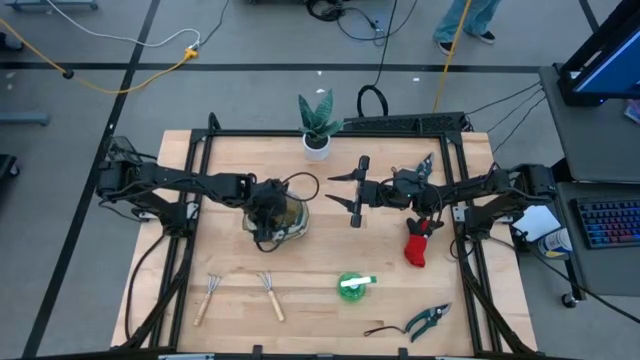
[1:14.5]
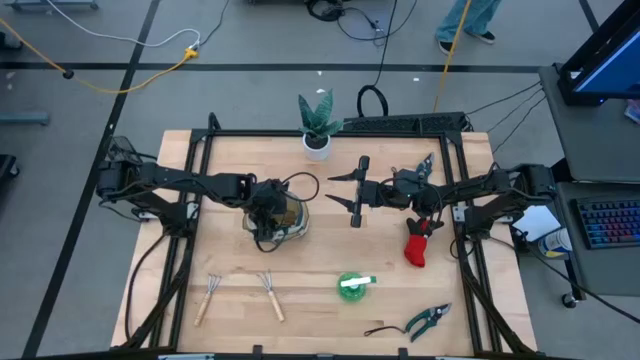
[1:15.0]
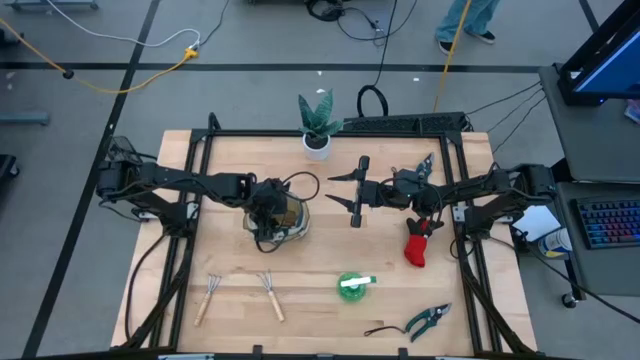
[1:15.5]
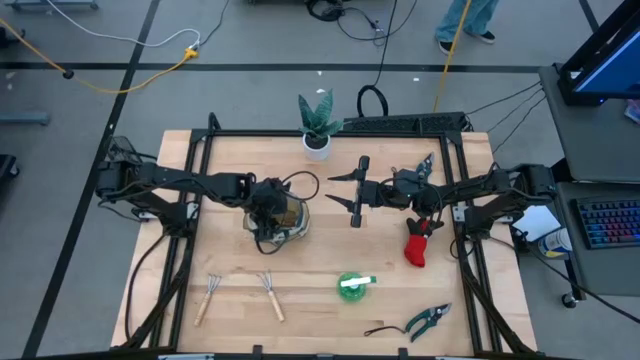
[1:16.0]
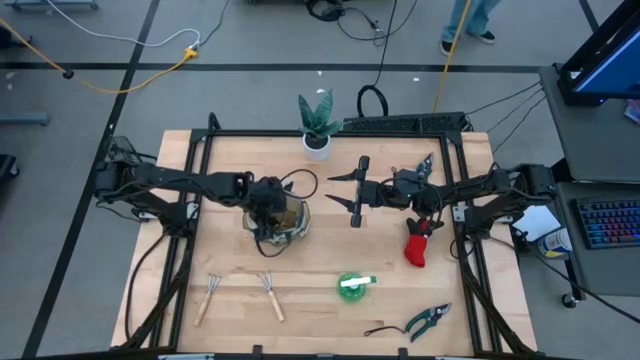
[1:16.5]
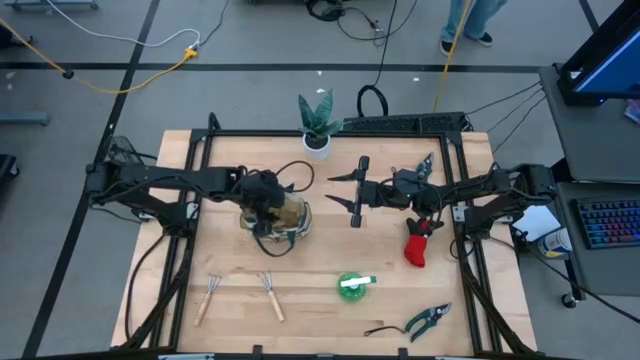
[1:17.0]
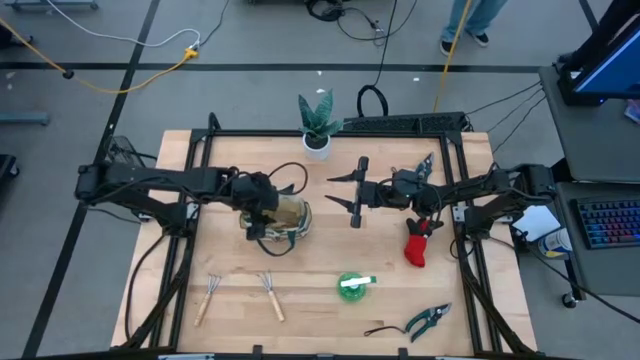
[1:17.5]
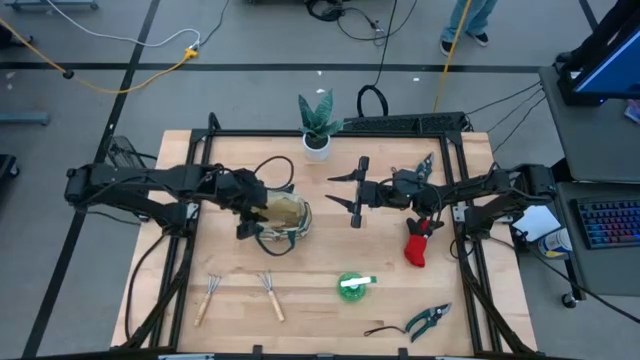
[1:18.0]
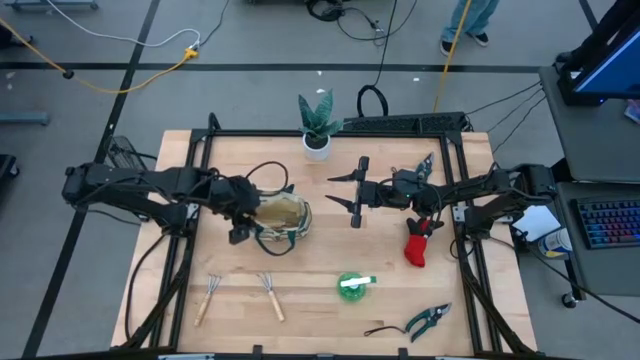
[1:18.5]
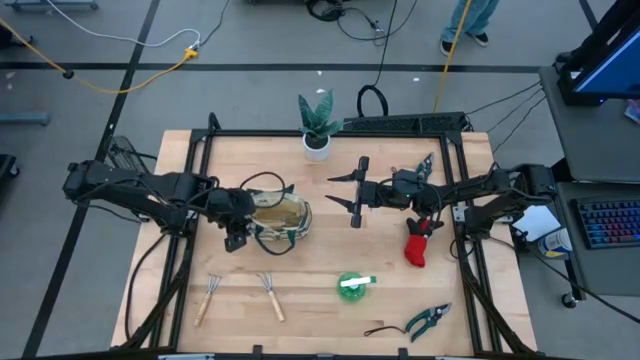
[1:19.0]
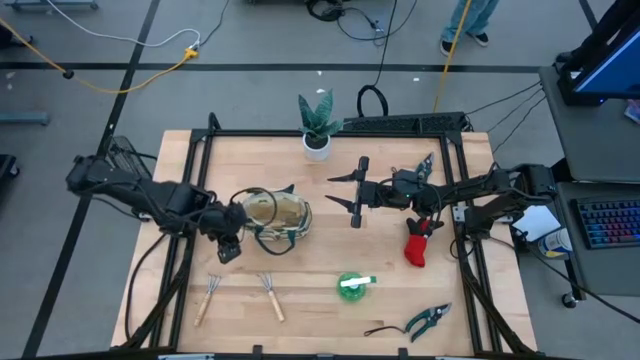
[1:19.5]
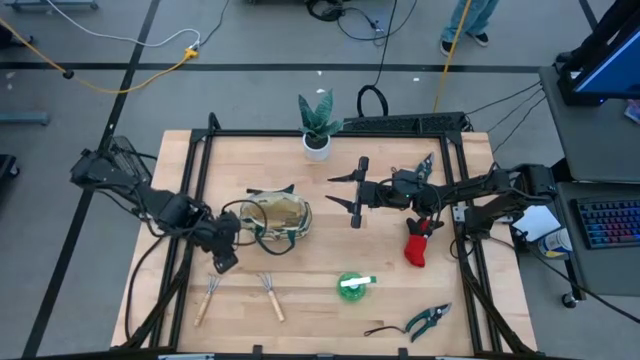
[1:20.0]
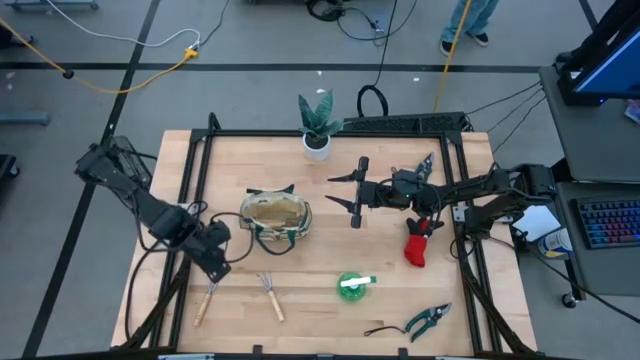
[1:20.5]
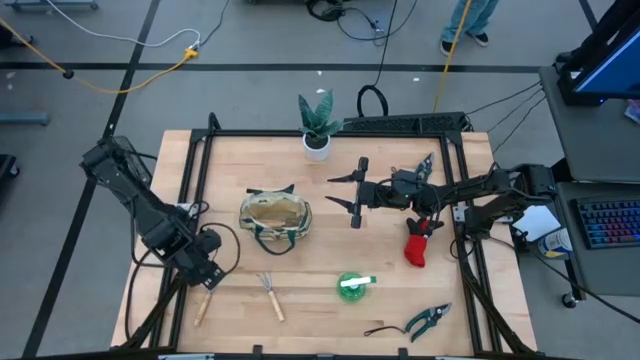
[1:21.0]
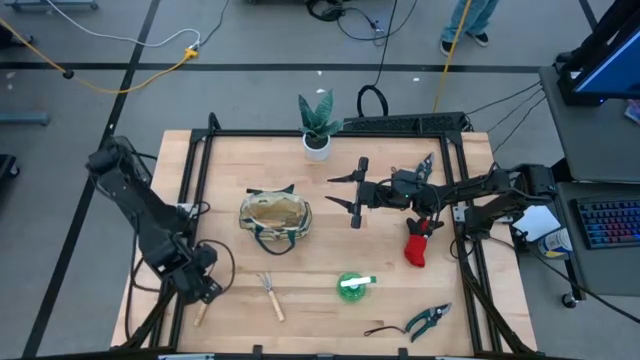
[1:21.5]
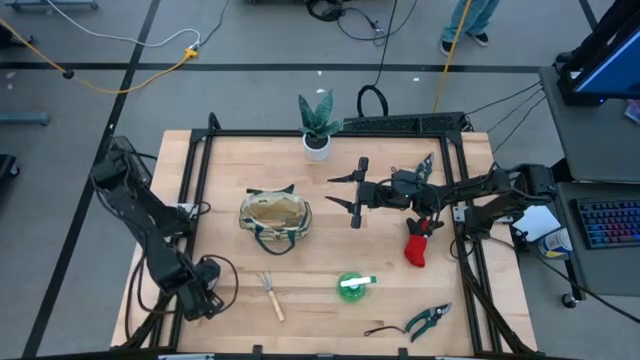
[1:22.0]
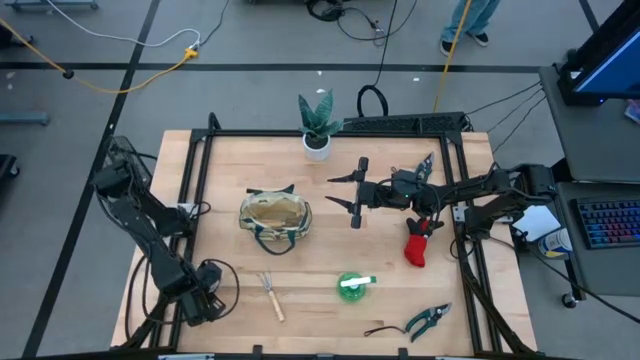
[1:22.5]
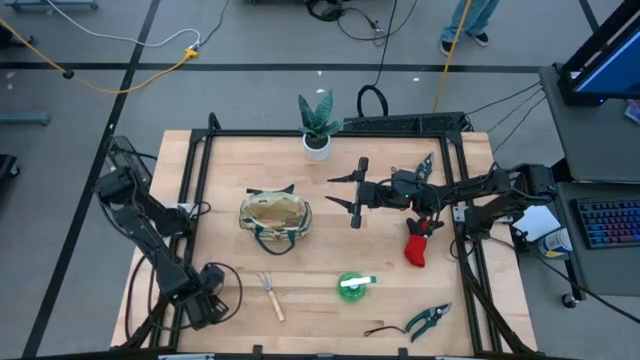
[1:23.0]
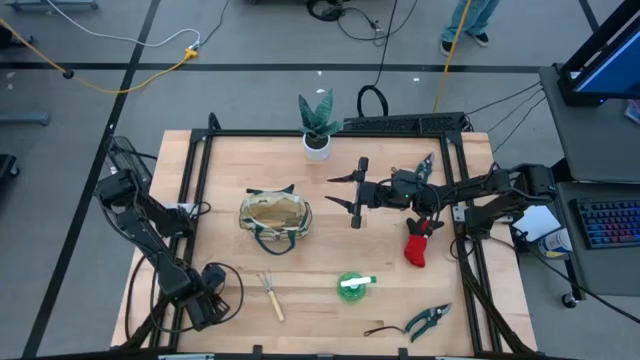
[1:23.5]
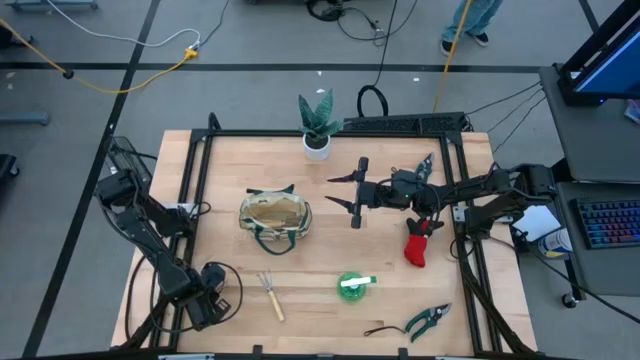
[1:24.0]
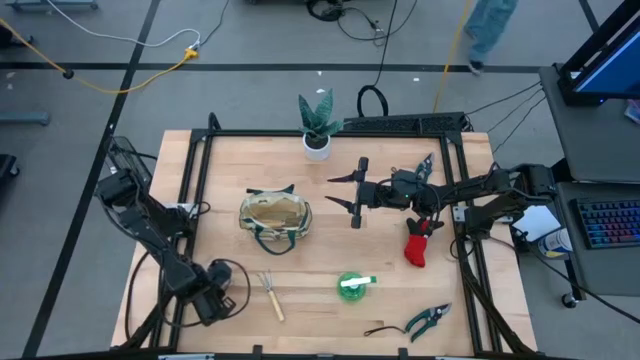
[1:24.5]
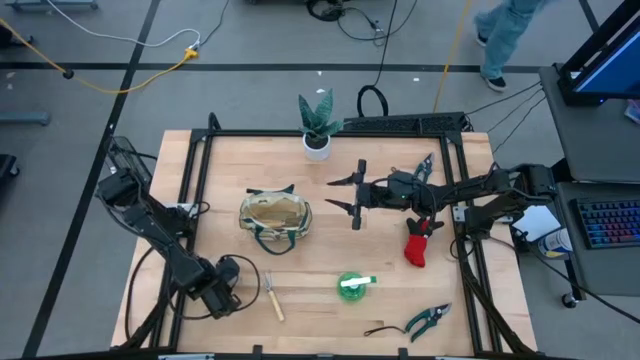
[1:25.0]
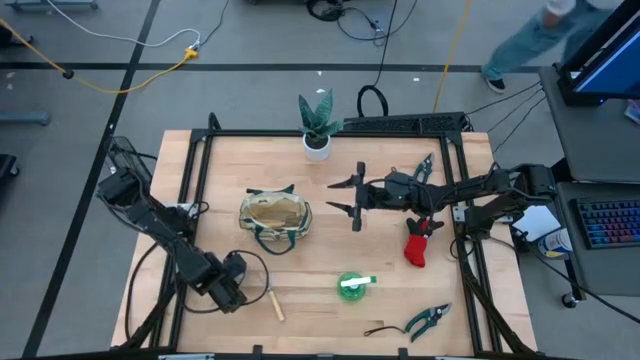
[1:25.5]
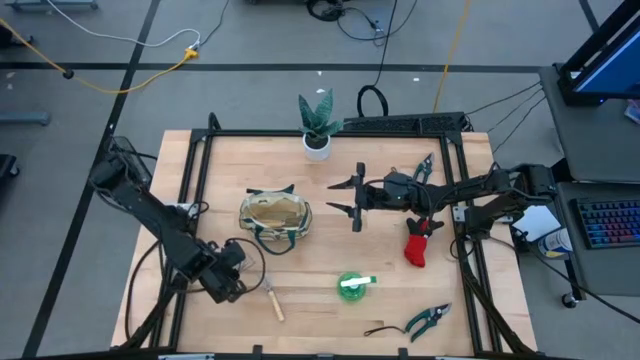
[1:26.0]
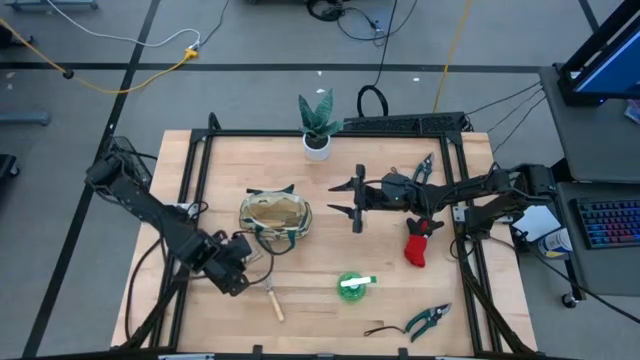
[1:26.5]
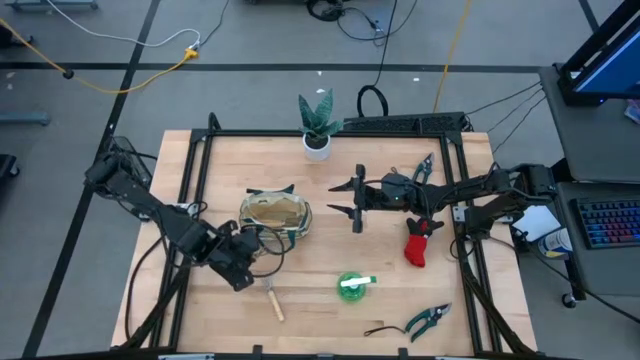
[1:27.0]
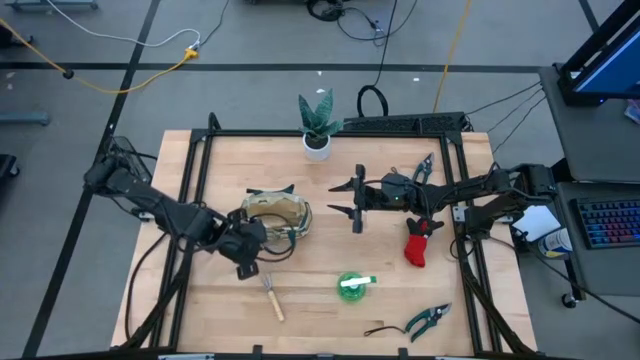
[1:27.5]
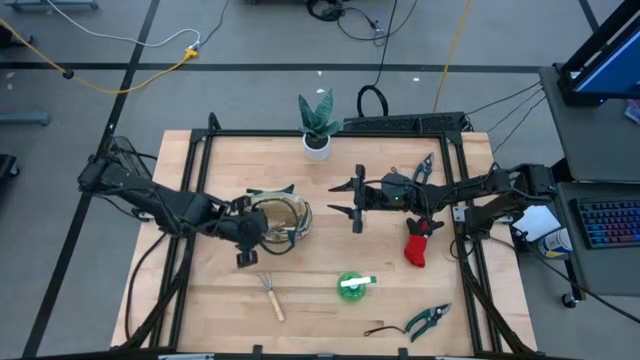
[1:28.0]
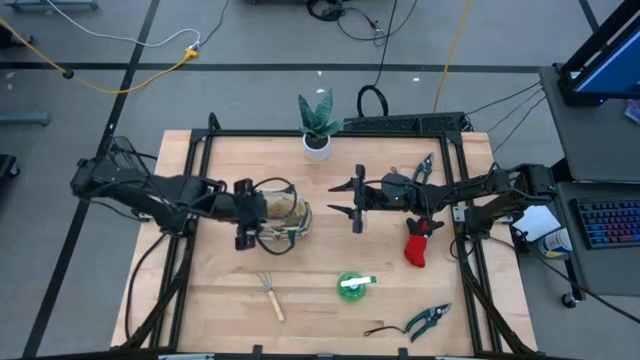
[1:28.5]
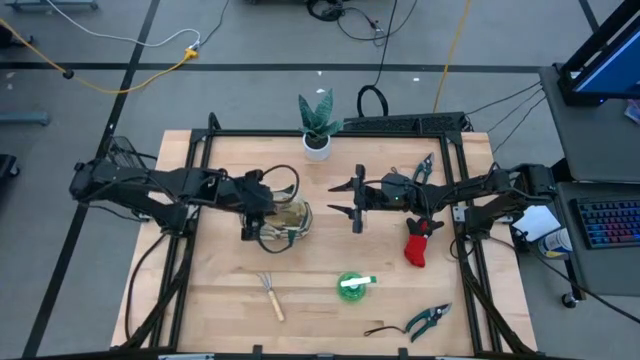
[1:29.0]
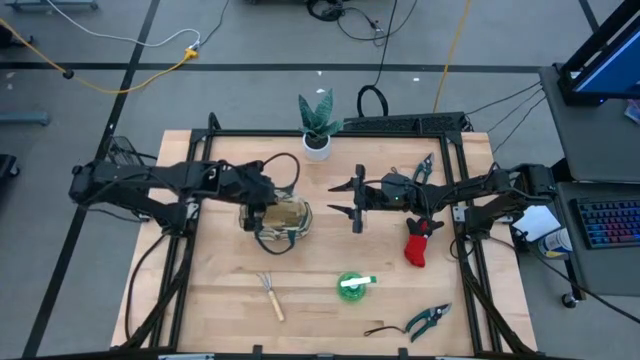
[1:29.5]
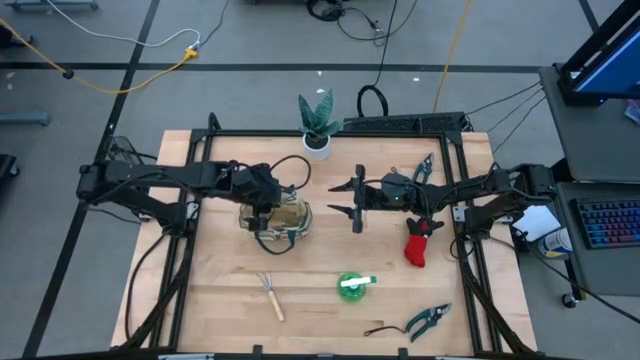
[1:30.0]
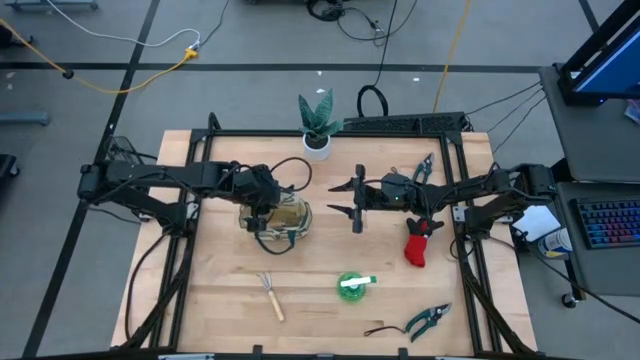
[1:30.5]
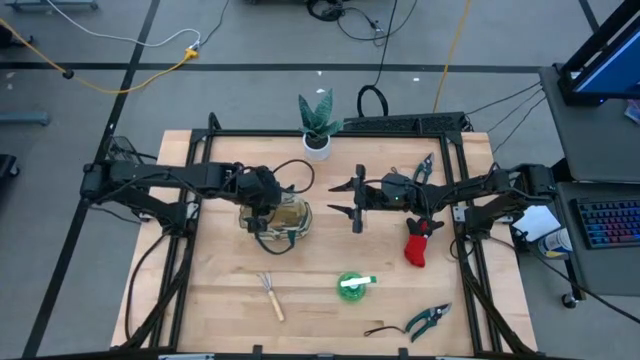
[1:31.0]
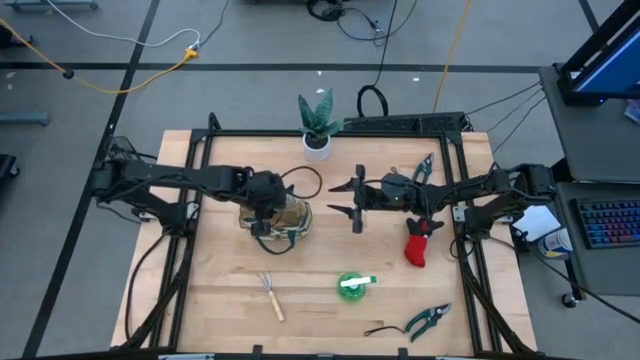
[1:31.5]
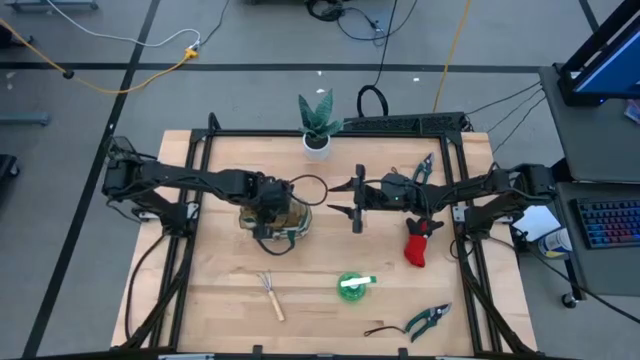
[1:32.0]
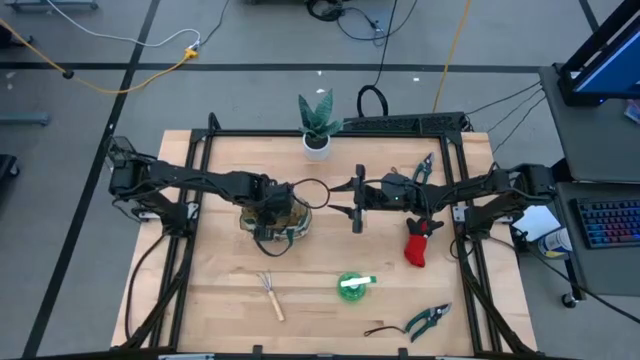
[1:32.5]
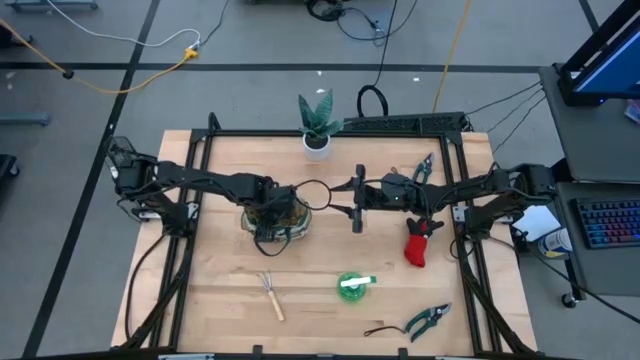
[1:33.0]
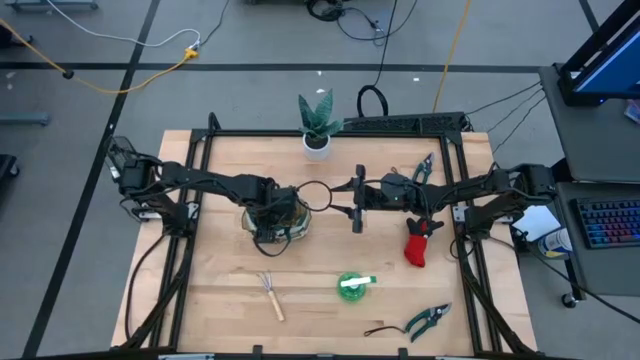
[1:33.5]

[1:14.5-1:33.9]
Task: Pick & Place Garden tools in Gardening bag
Put the left brown hand rake into the white gardening bag

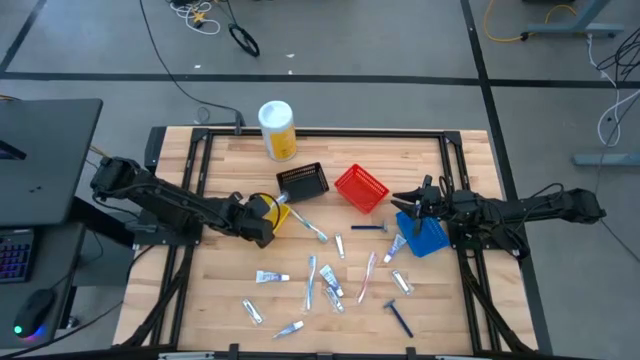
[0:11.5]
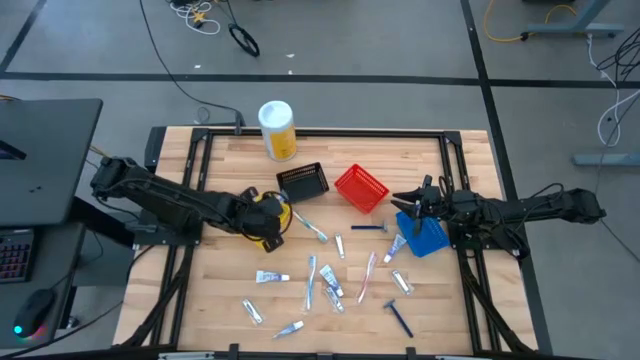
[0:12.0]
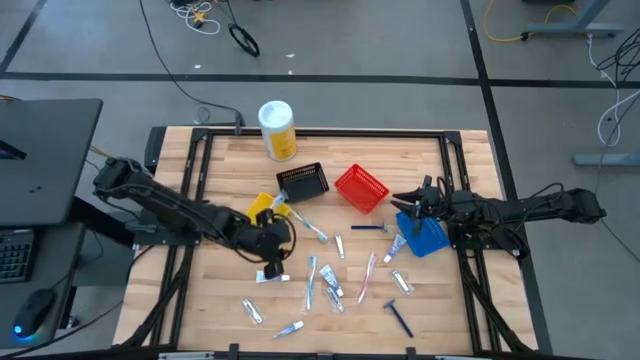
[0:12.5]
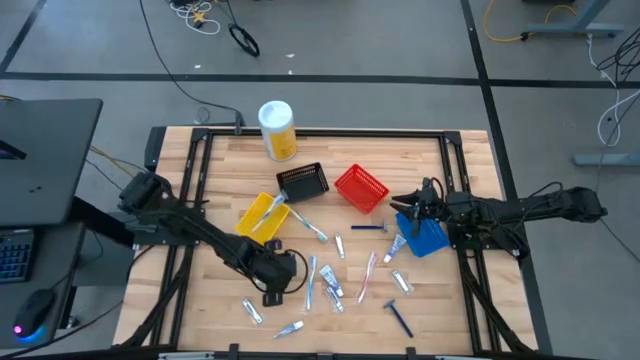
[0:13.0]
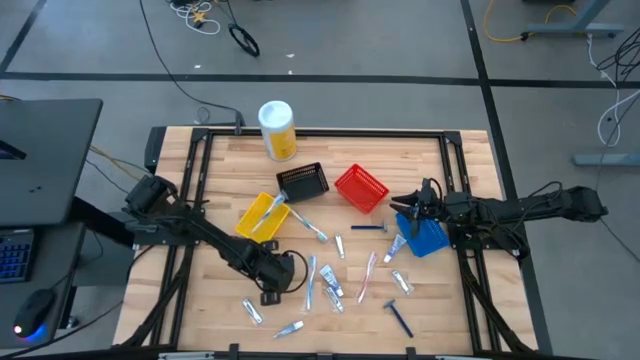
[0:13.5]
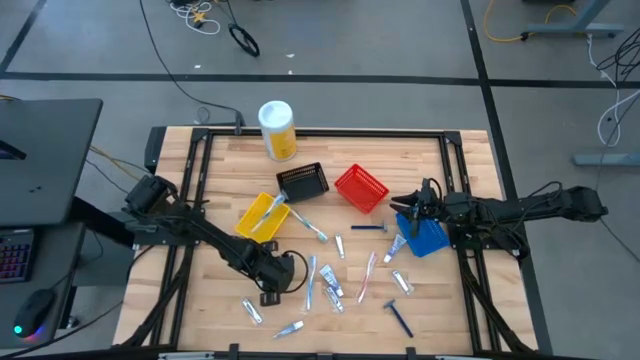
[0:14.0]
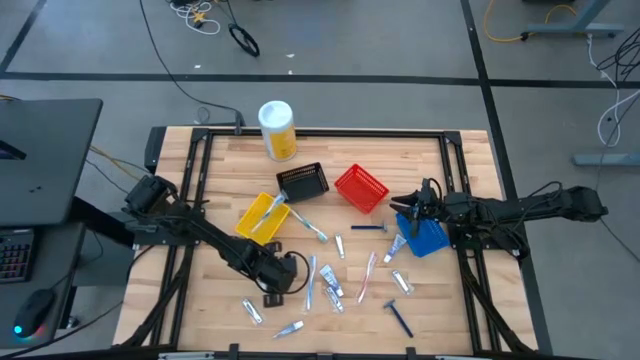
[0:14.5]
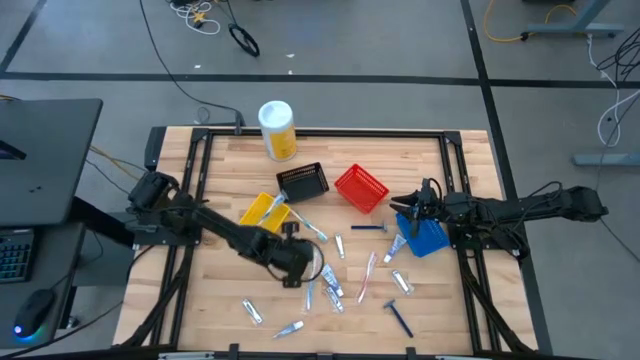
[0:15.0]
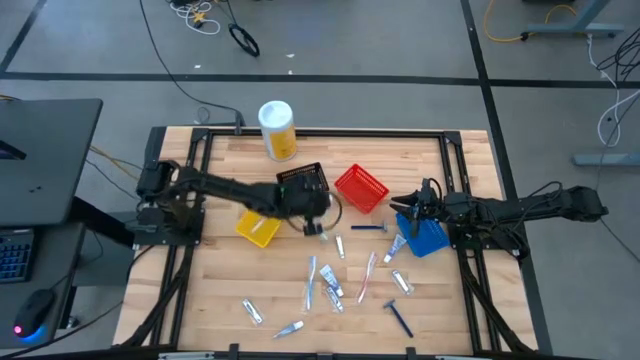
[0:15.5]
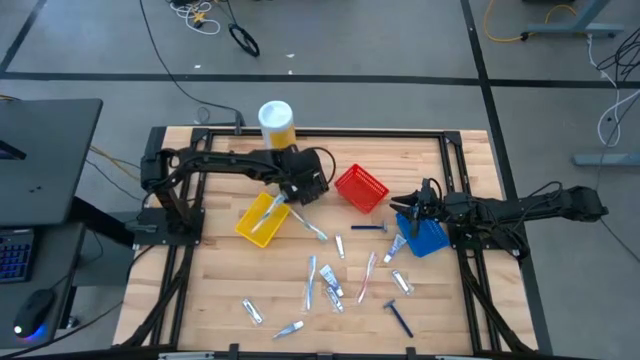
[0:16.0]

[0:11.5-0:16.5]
Task: Pick & Place Travel size toiletries
Put the white toothpaste into the black basket
